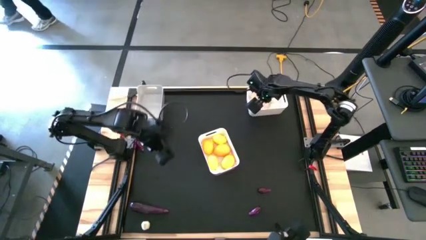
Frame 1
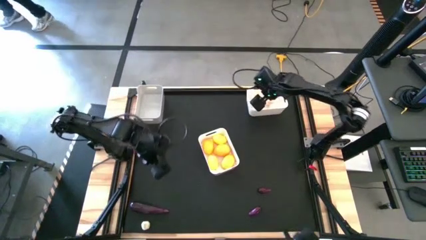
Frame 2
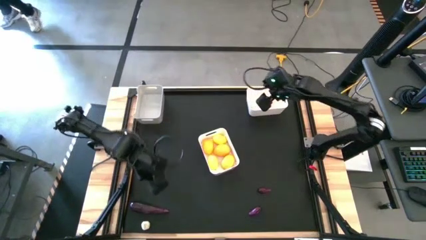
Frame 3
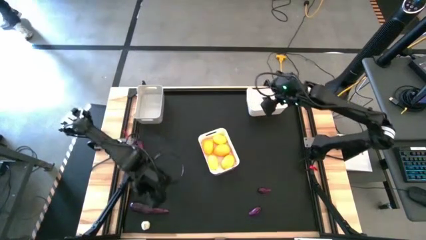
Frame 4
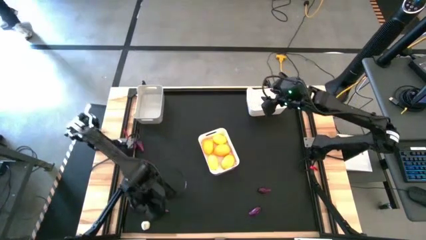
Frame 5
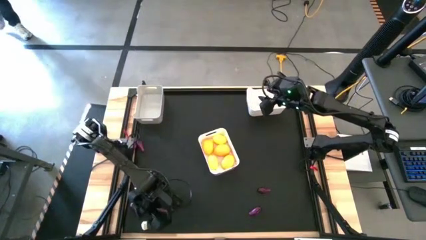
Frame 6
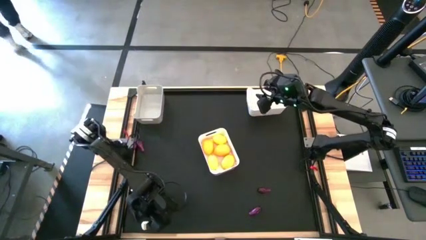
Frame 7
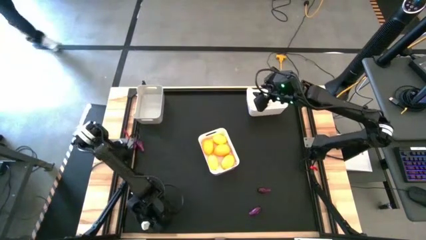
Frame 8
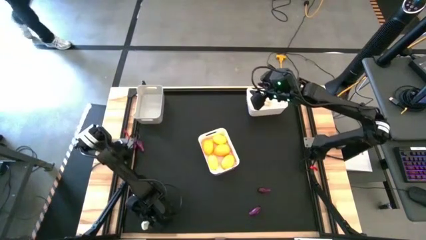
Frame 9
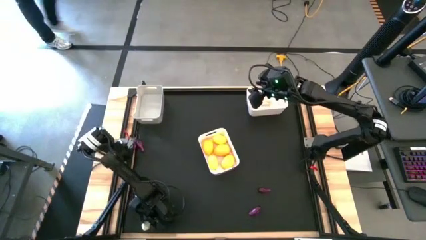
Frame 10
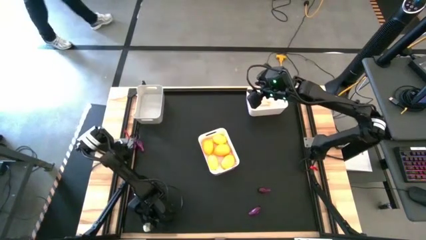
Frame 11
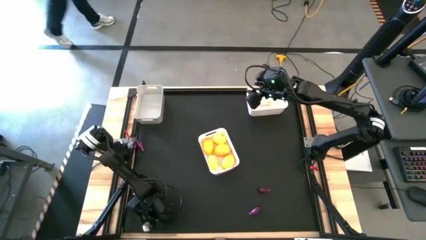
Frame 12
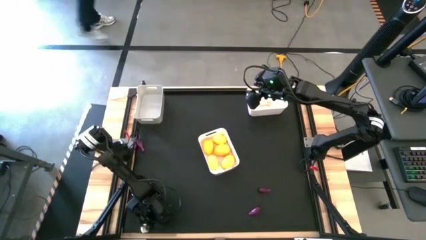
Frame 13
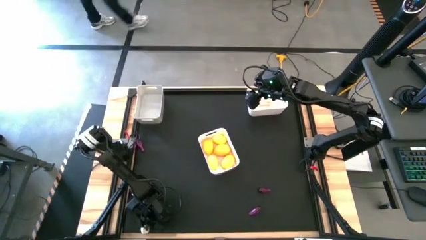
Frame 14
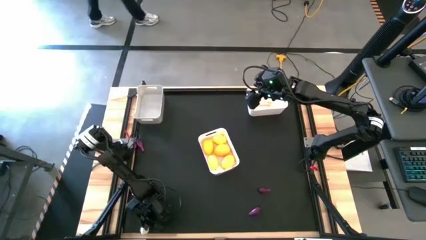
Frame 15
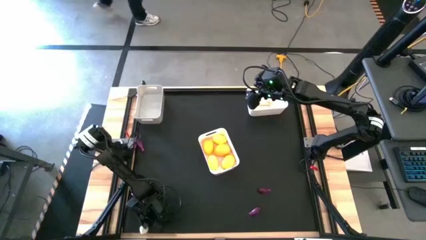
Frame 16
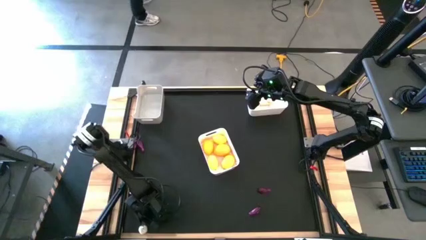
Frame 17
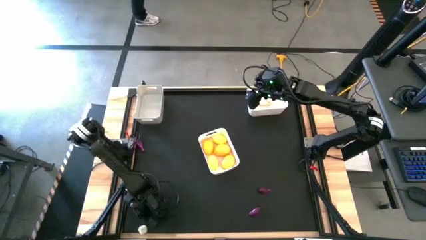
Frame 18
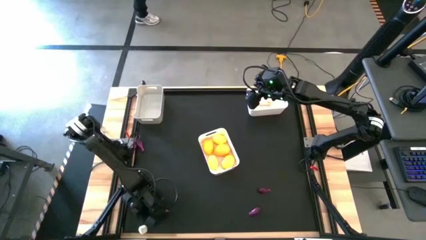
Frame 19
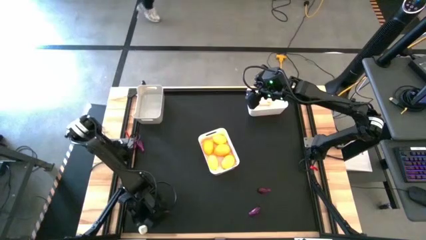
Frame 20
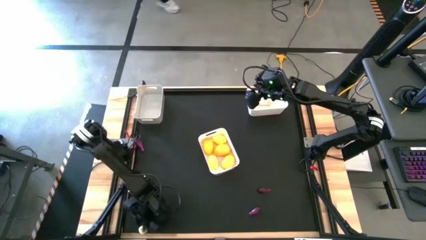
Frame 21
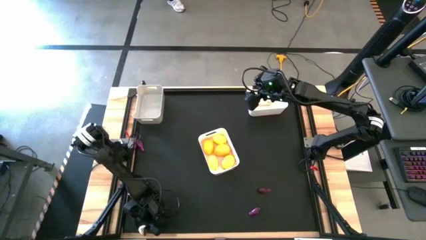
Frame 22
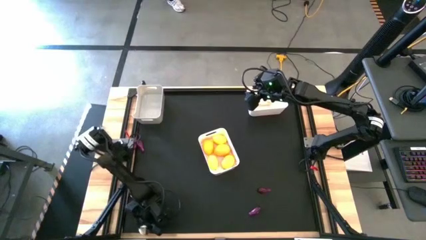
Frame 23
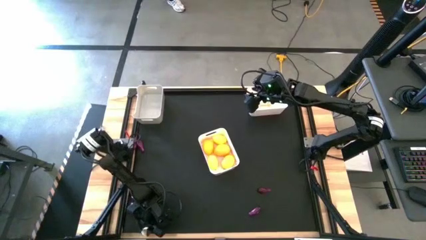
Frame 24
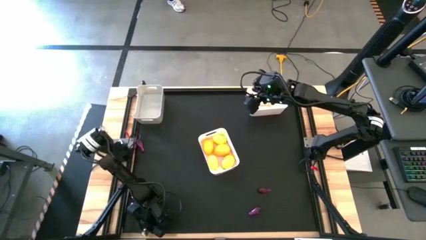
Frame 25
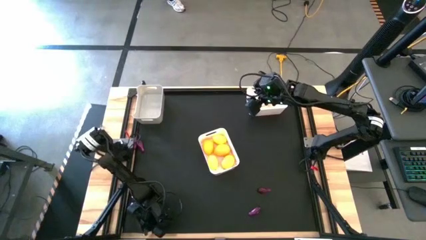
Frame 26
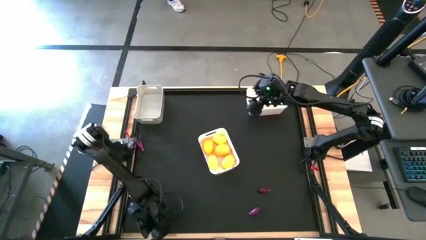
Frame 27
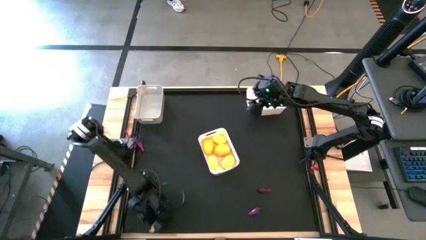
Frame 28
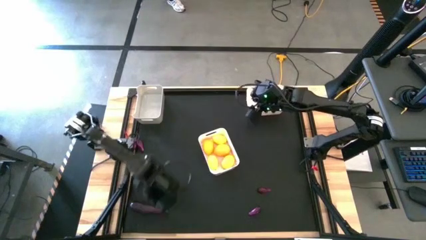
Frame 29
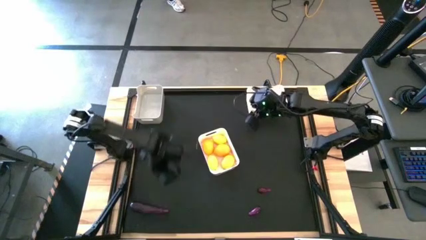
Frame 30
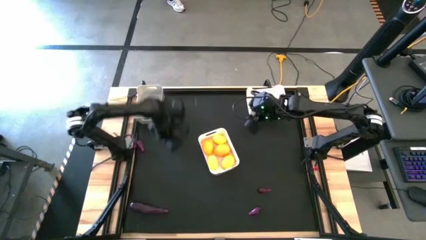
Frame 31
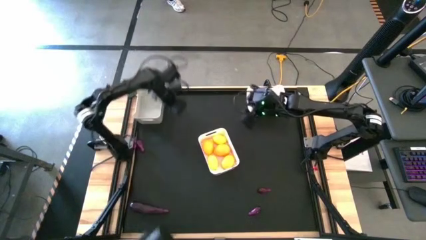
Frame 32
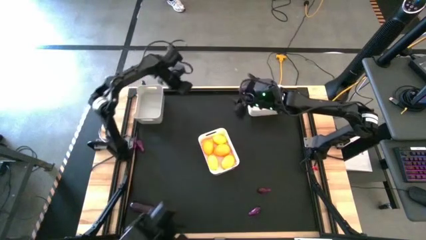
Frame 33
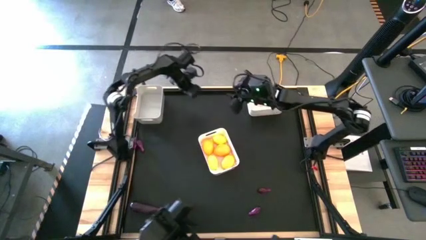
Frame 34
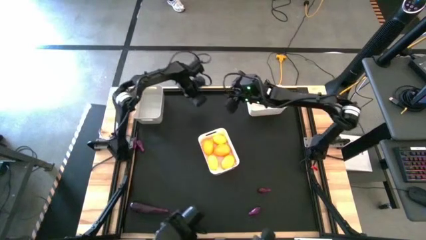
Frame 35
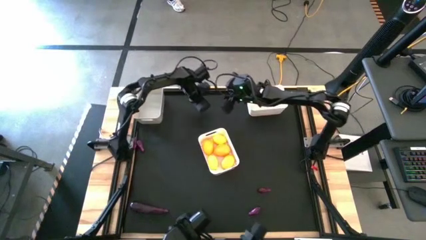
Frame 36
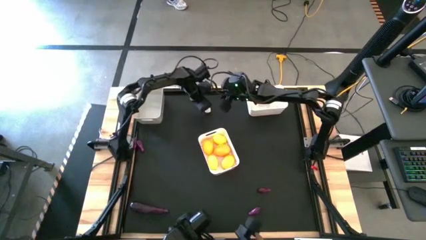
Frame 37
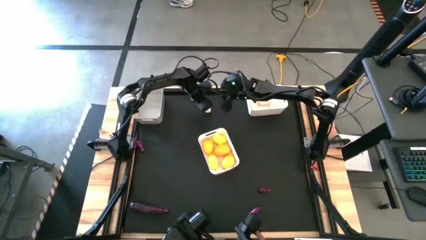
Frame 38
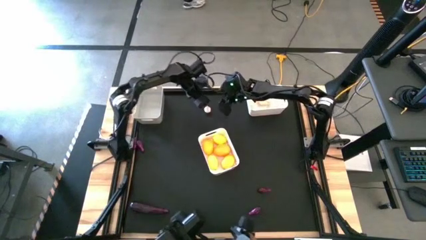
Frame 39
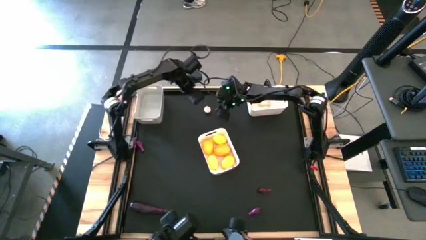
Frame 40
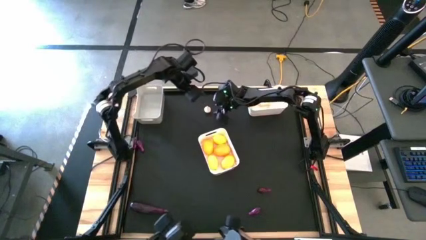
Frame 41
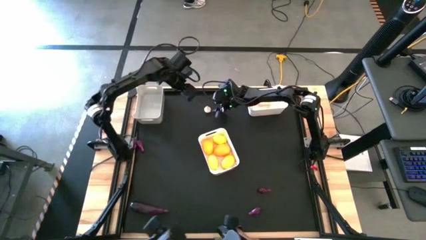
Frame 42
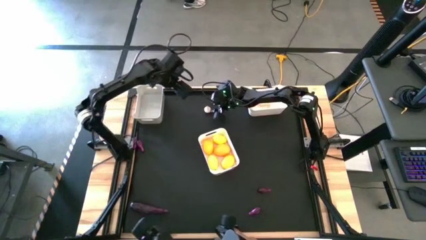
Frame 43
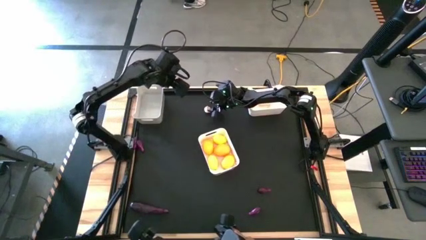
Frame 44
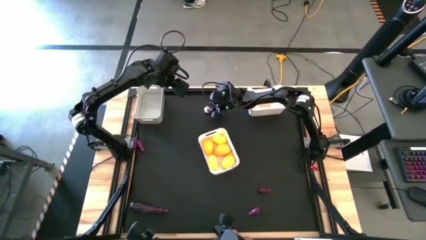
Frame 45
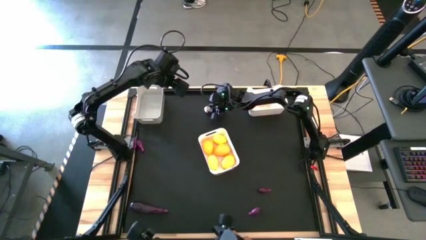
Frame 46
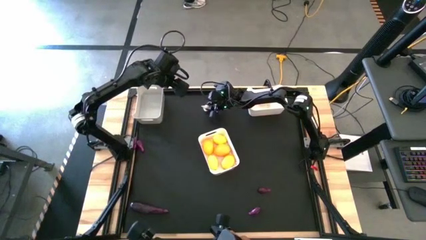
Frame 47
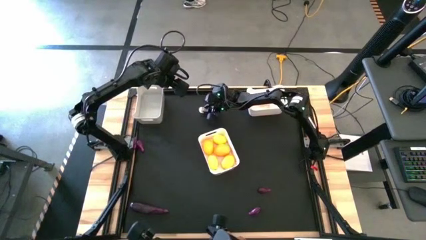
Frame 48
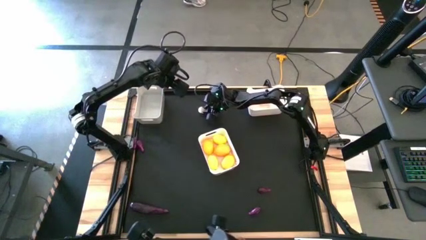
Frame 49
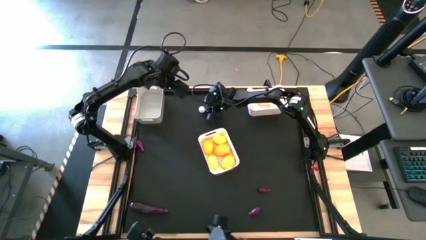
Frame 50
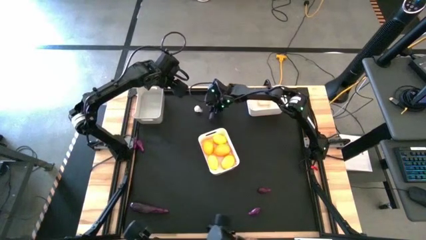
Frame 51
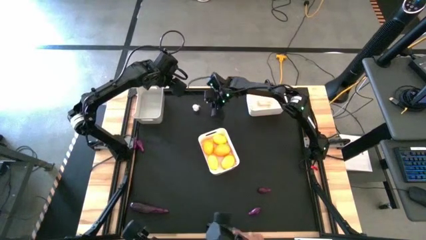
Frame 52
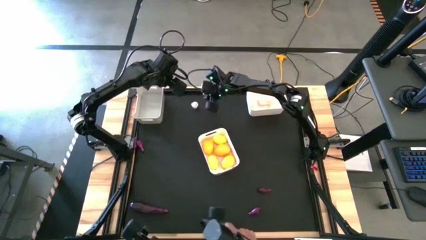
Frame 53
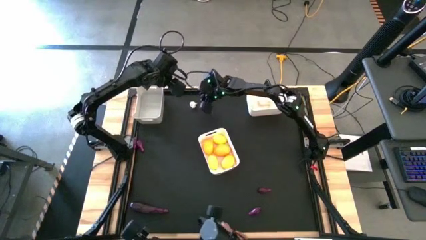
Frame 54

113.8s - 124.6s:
Task: Sort produce into baskets
Put the garlic into the top white bin

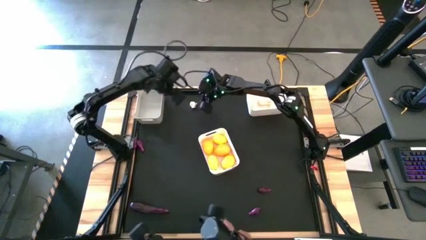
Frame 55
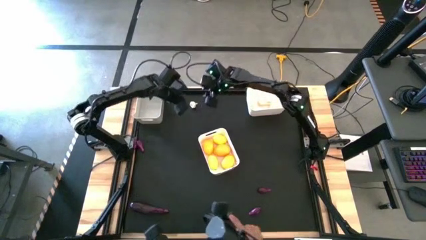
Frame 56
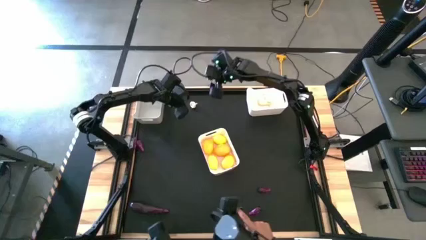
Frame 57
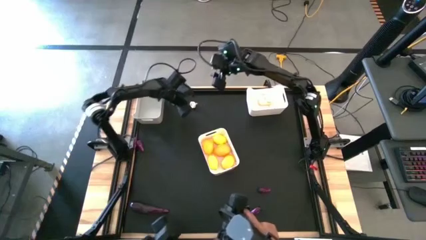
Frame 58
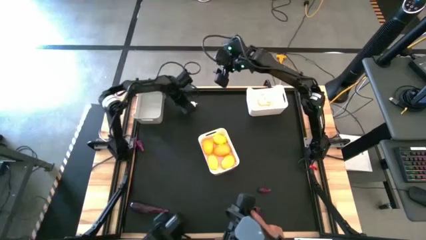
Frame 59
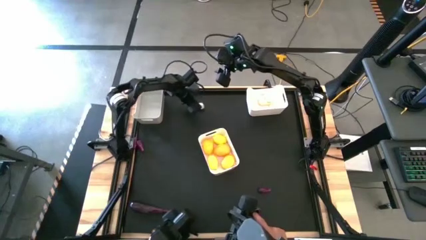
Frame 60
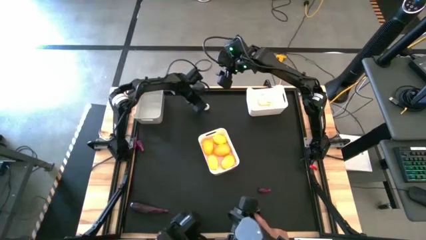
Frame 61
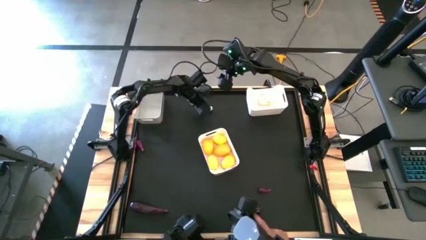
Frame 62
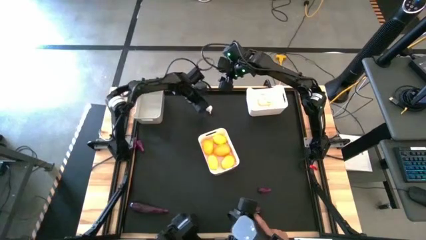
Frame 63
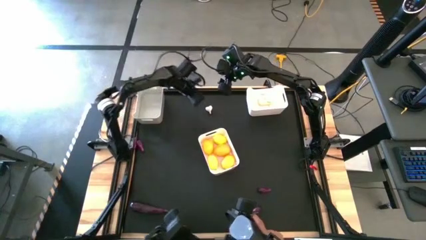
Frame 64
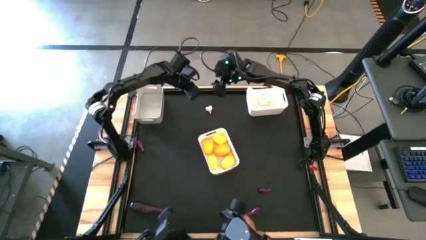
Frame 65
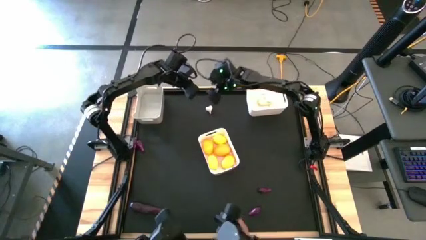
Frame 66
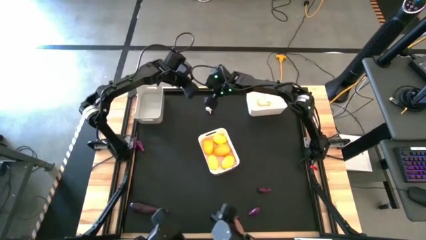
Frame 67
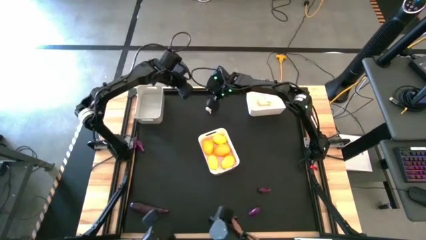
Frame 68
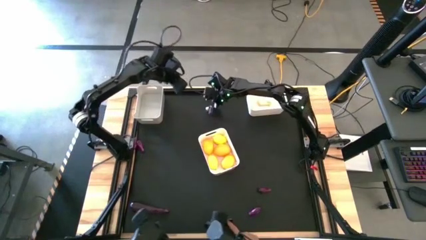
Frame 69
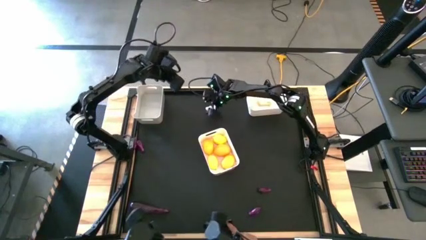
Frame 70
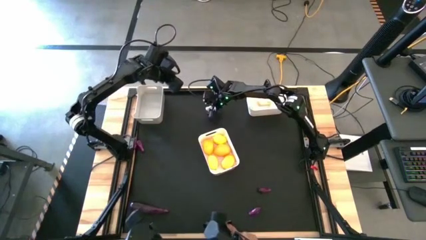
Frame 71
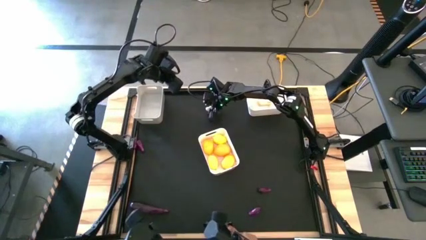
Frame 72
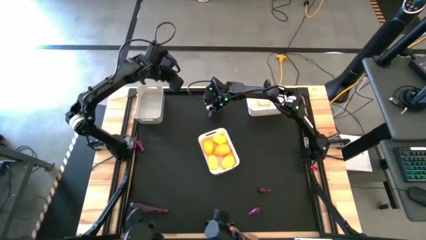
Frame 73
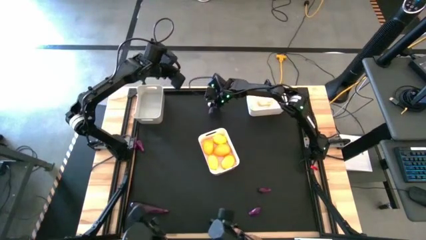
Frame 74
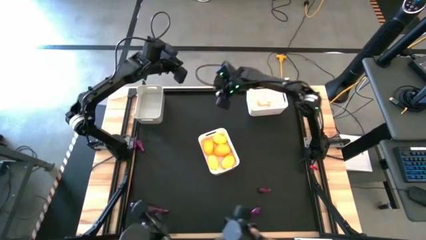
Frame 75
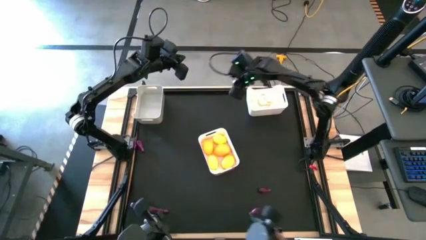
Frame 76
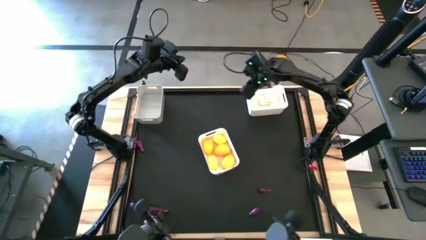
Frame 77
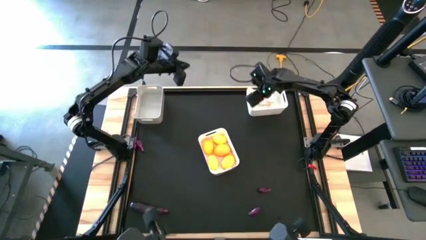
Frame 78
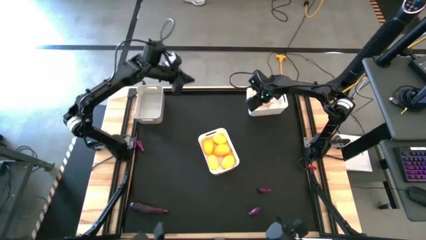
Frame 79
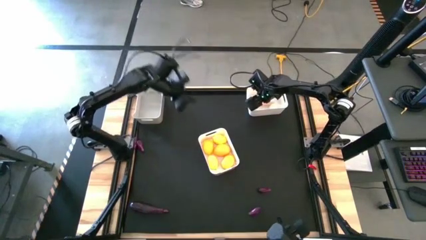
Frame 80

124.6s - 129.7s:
Put the garlic into the top white bin

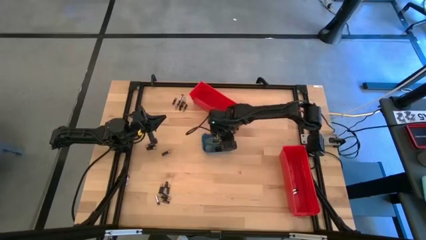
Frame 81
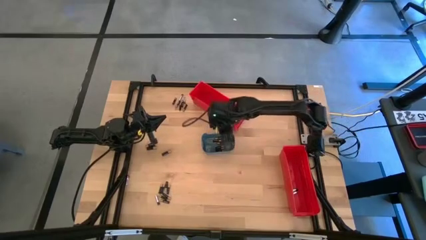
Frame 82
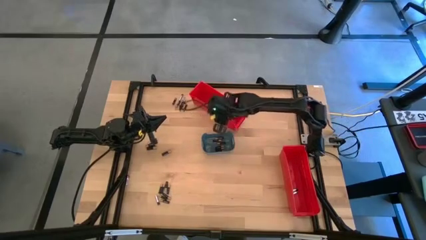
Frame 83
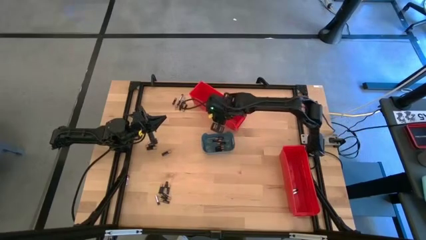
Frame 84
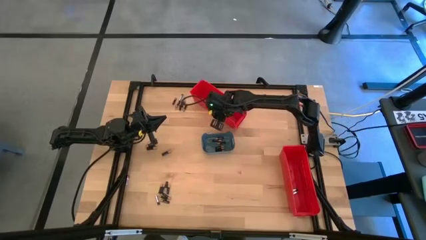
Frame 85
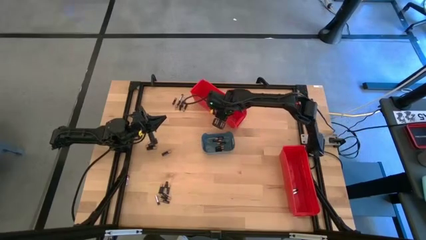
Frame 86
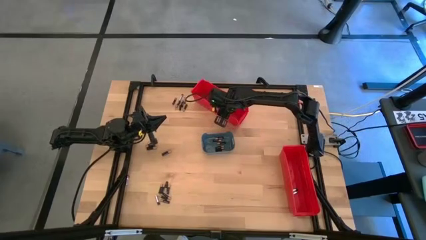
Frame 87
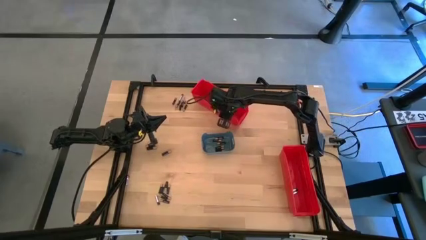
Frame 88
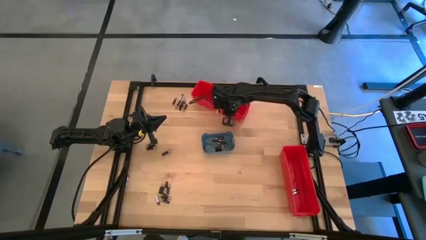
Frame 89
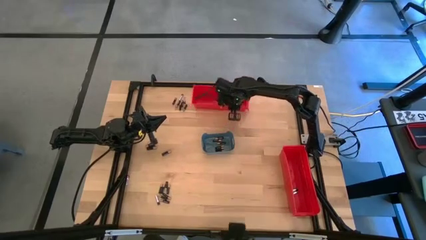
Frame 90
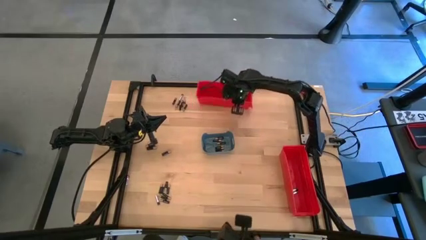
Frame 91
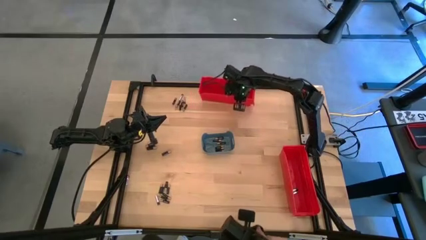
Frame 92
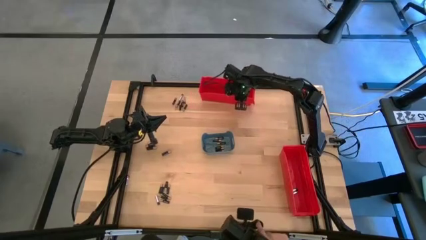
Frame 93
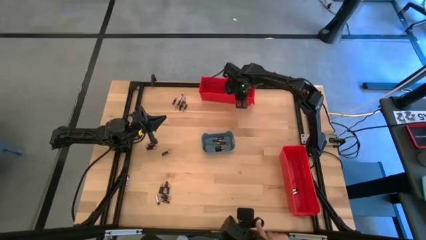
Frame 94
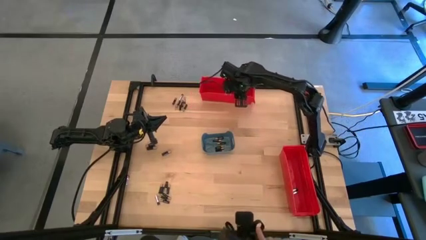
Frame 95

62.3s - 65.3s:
Task: Sort batteries
Adjust the top red bin
